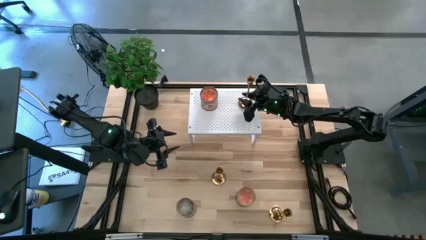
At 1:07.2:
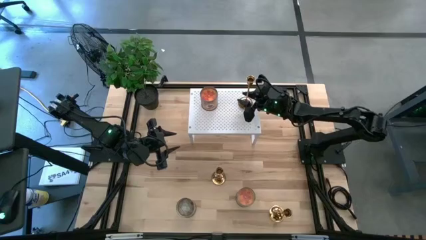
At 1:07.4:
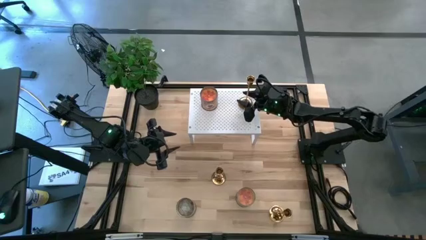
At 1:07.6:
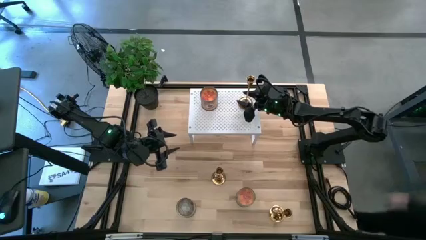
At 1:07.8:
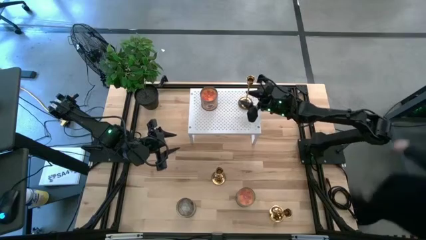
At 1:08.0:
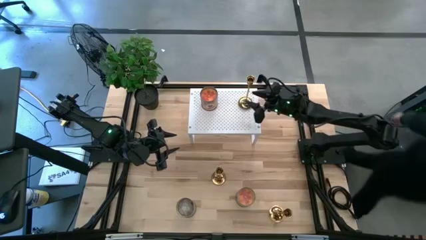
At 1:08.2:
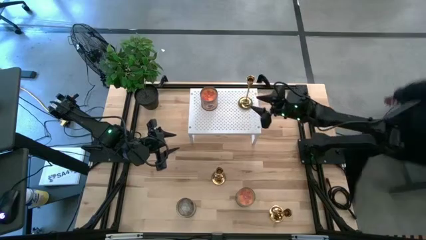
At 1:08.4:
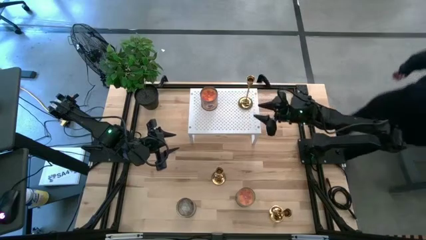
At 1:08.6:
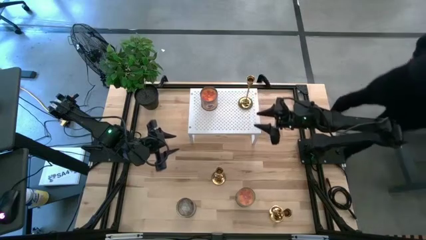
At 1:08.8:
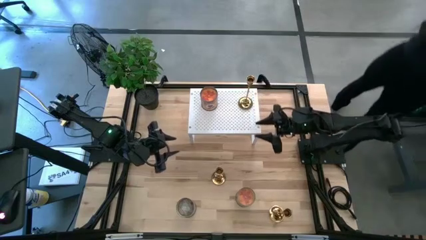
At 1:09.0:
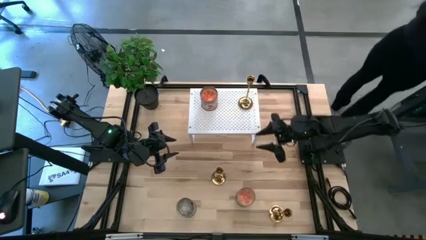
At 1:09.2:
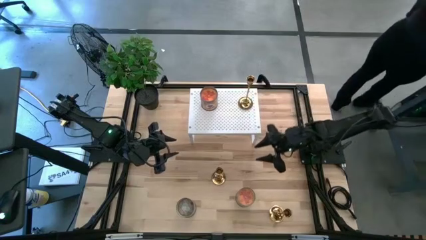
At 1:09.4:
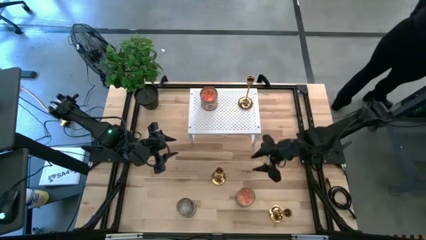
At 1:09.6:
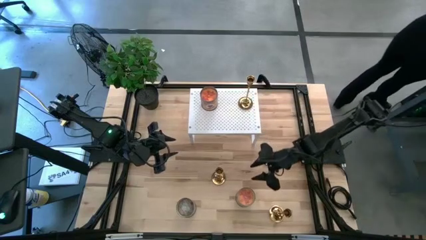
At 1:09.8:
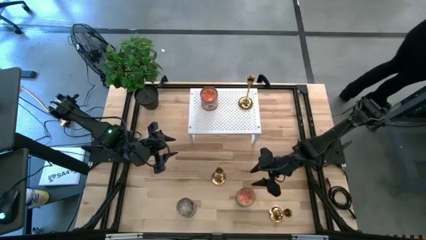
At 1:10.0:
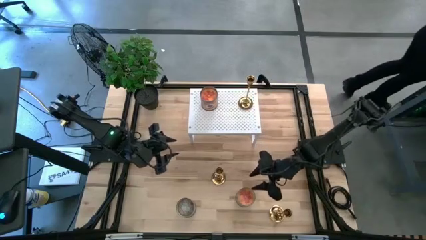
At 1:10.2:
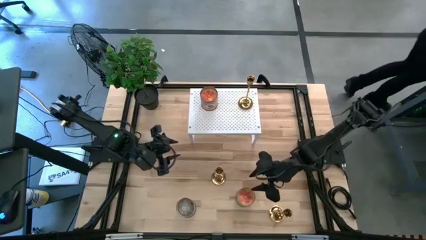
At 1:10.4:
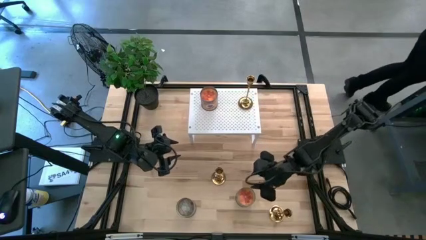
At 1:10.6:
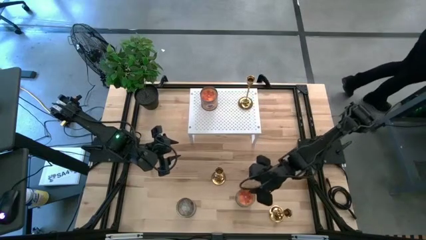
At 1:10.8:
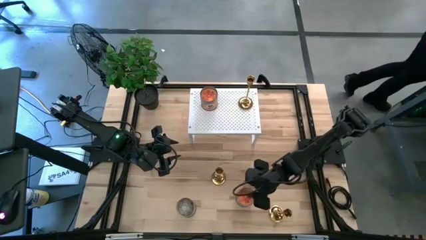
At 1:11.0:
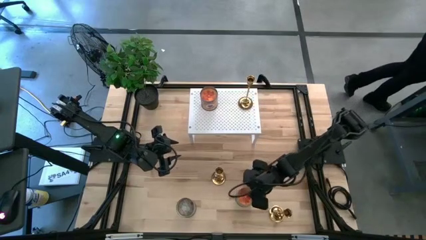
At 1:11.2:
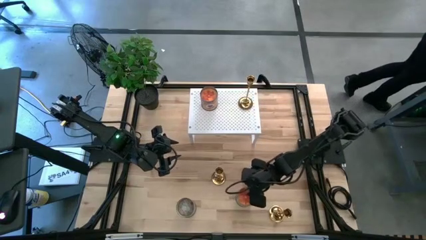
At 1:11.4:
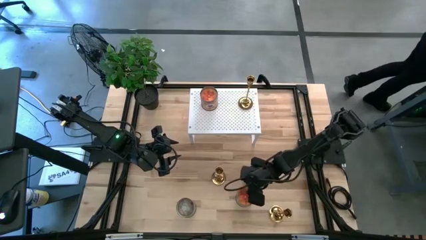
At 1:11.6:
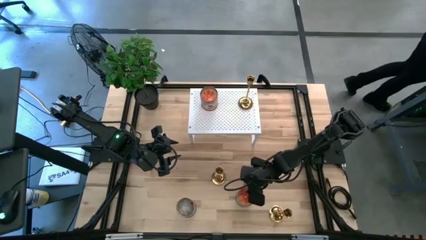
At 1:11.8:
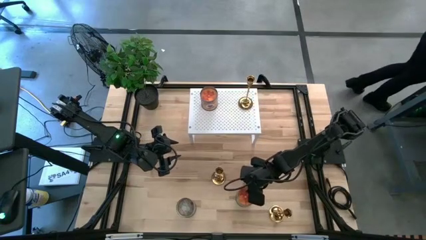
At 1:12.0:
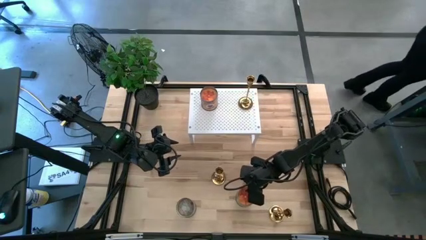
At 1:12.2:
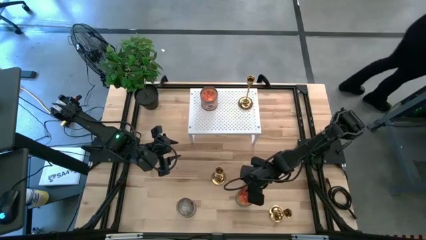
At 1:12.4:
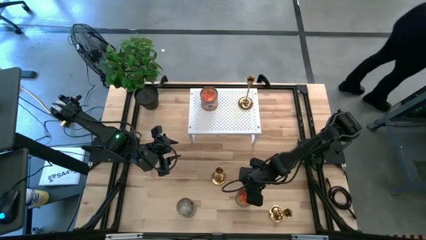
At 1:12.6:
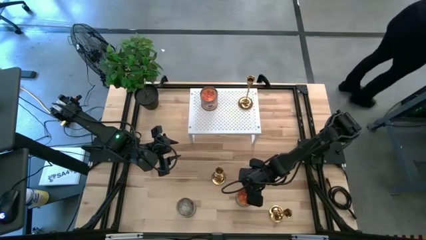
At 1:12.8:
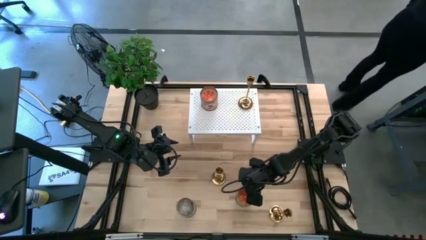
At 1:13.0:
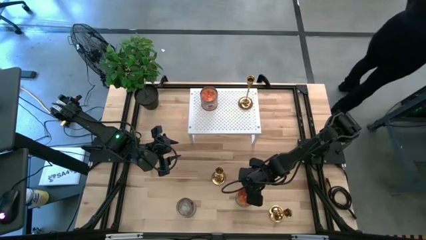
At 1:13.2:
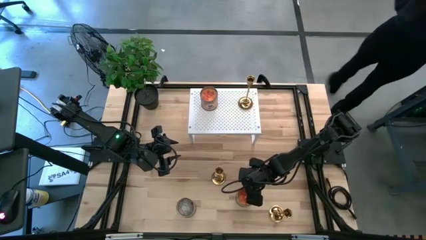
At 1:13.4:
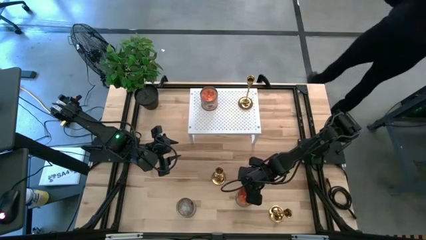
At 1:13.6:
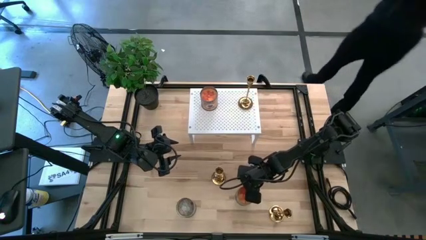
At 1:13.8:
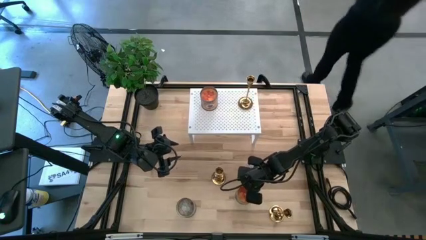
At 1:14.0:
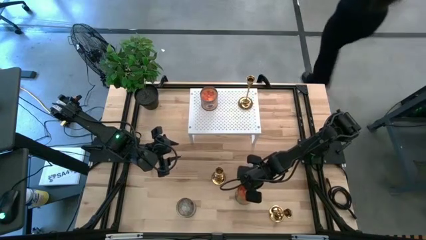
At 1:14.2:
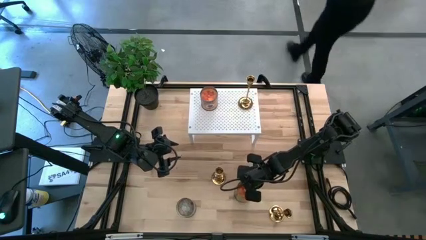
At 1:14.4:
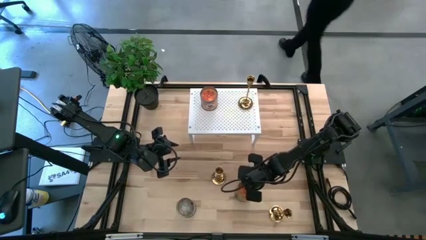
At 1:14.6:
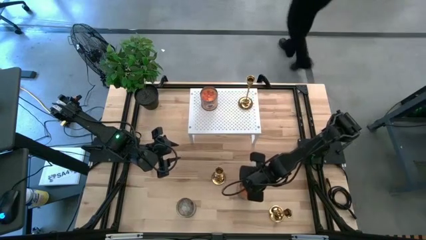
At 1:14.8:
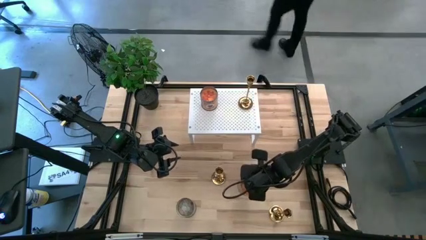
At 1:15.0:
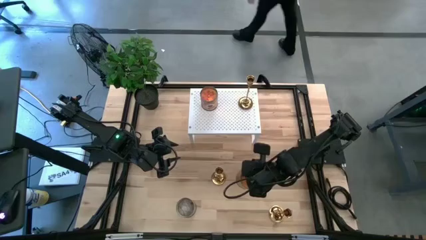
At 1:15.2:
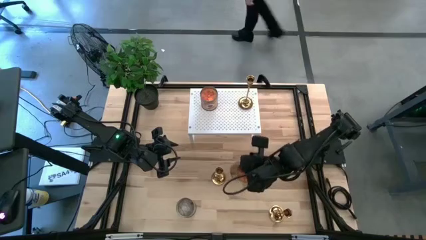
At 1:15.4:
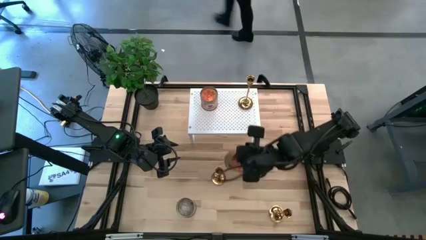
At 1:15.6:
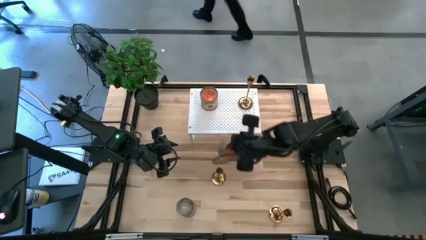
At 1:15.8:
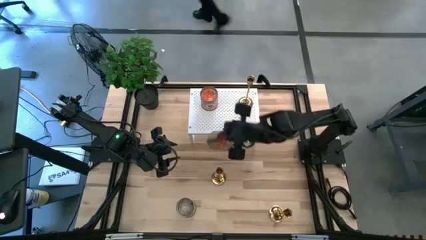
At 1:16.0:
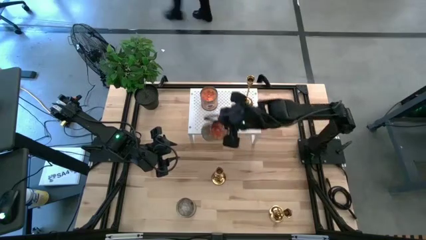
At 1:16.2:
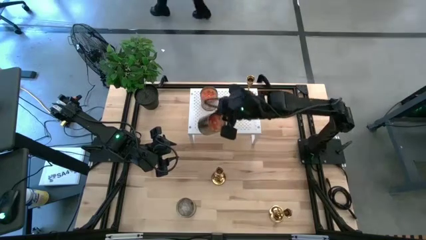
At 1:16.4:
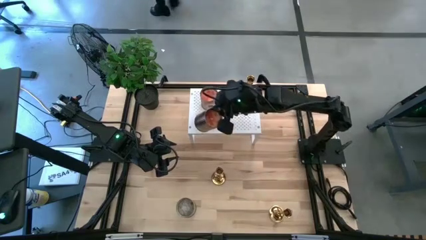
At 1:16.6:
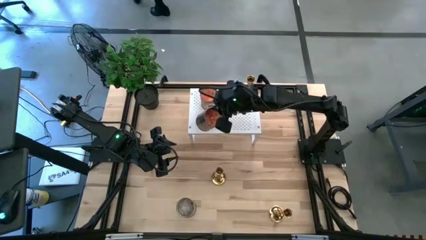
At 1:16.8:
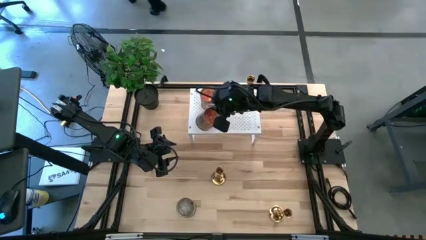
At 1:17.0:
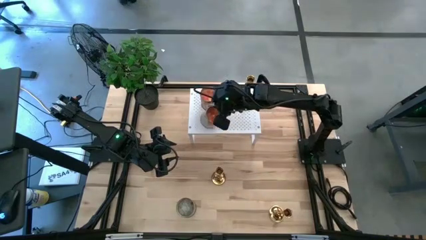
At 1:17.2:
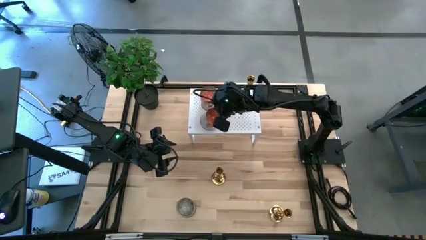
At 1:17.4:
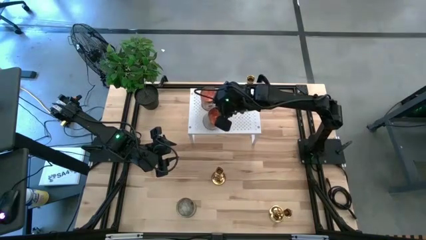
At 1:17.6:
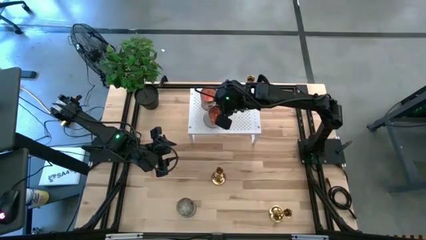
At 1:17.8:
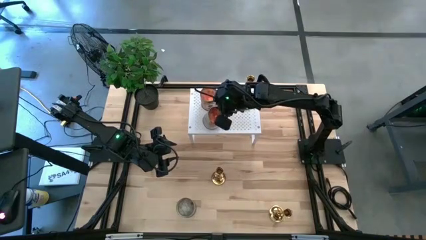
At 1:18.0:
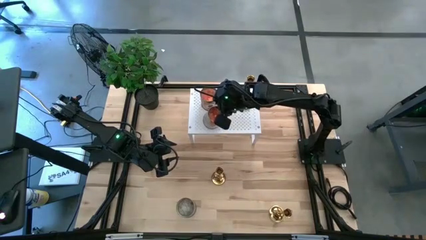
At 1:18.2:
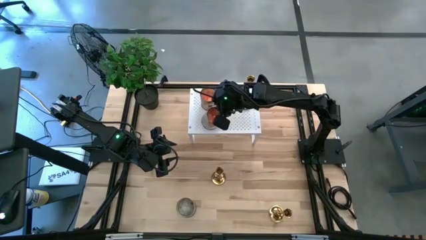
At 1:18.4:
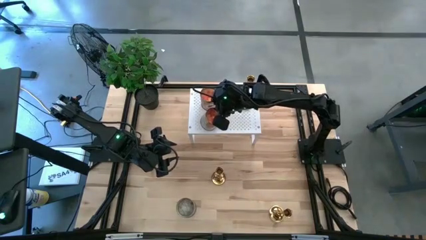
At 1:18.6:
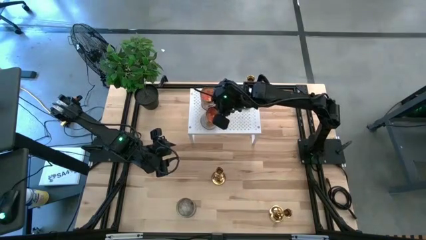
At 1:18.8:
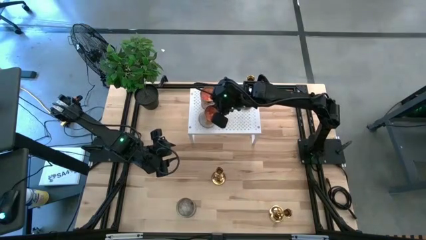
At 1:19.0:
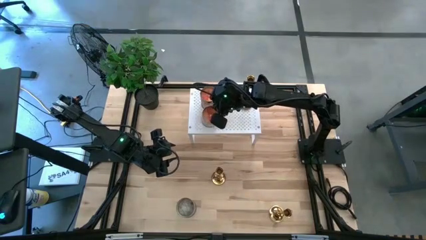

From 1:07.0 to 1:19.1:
Task: Pick & Place candle stick holders
Put the orange scented candle on the shelf
